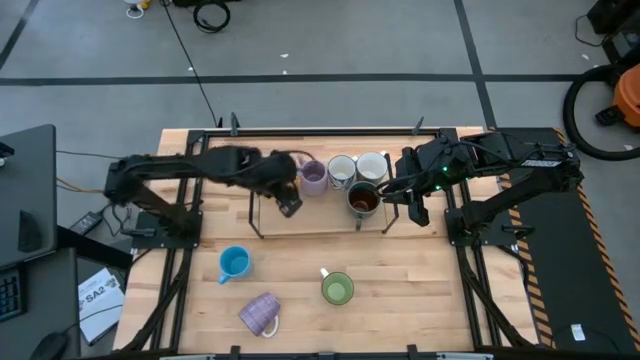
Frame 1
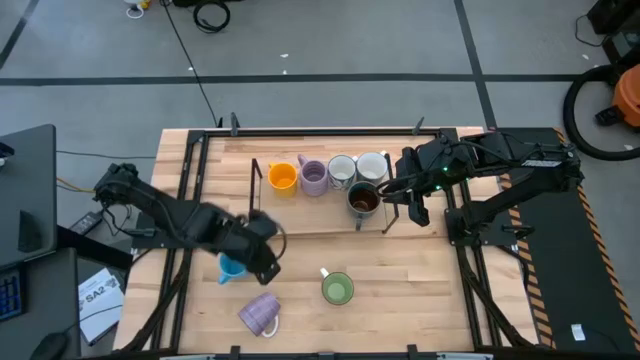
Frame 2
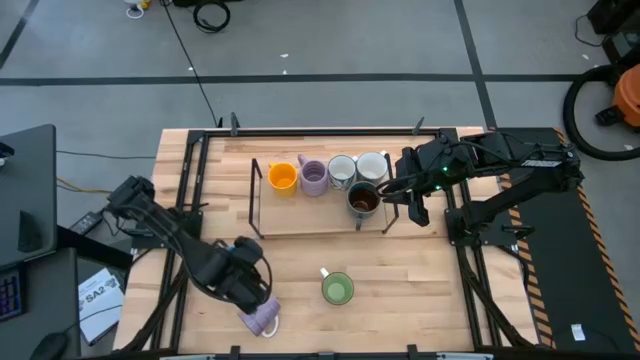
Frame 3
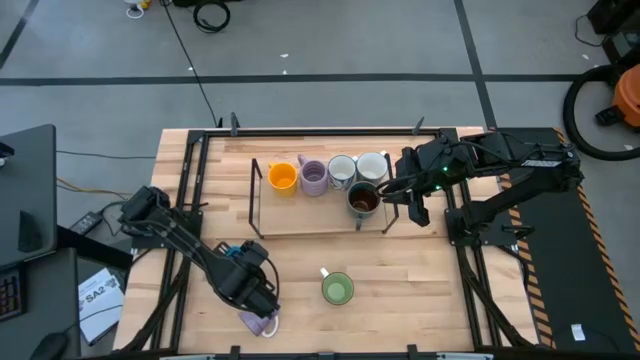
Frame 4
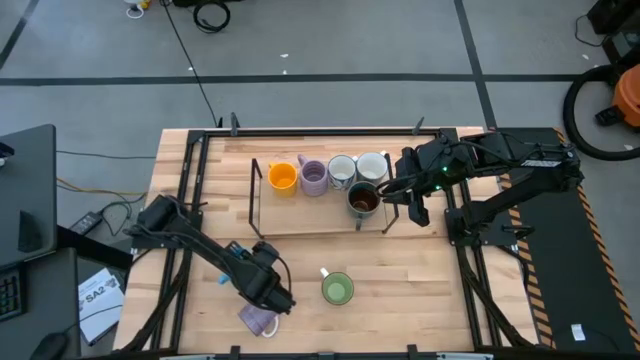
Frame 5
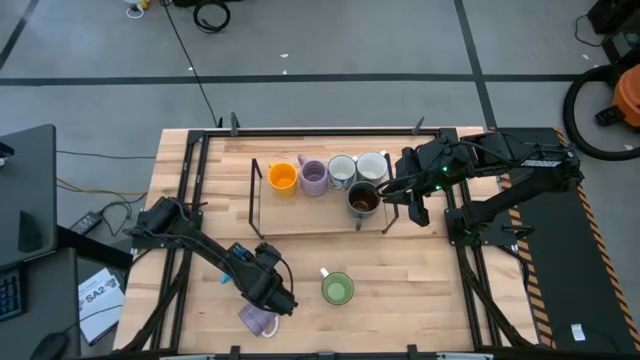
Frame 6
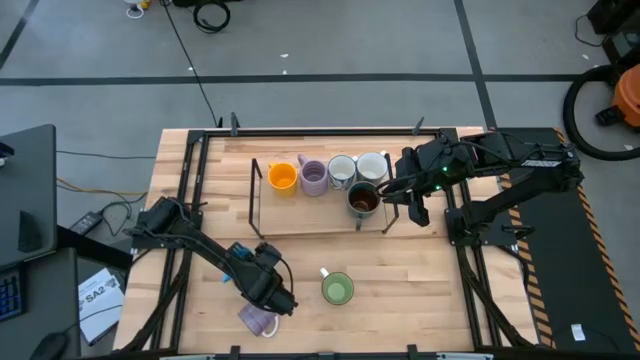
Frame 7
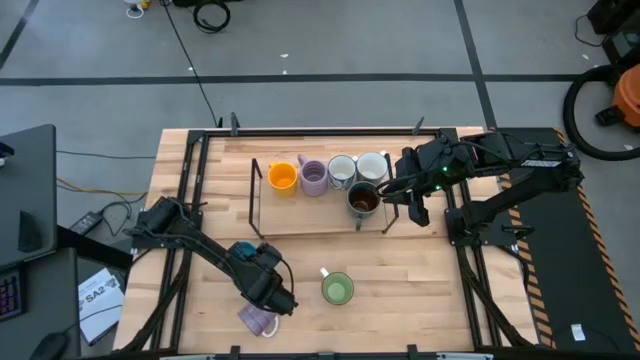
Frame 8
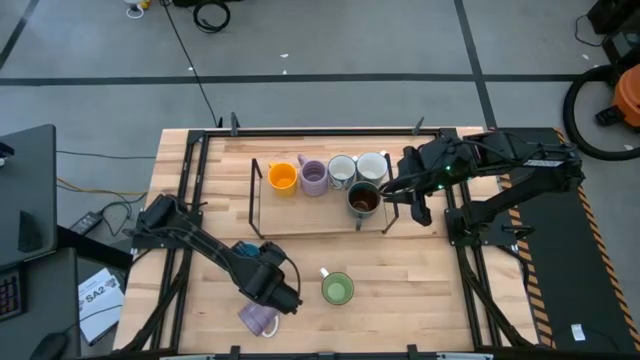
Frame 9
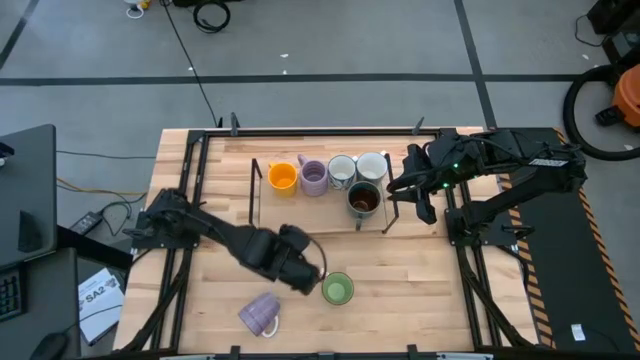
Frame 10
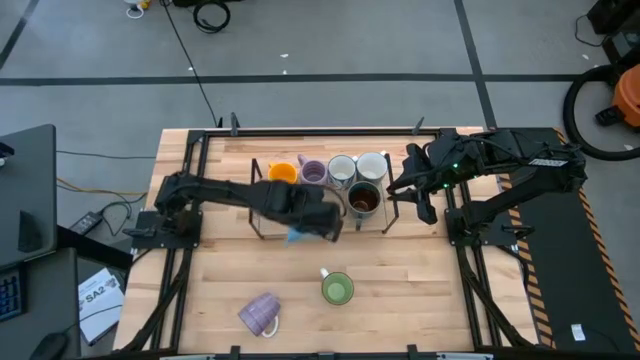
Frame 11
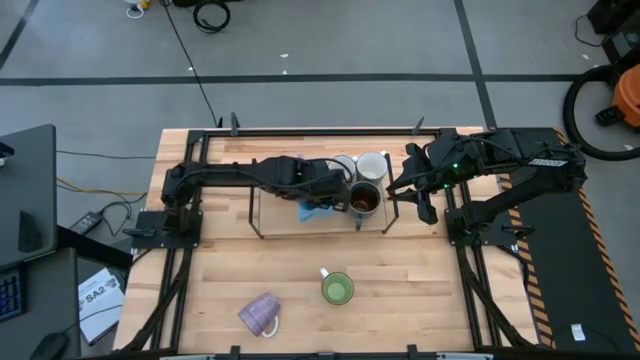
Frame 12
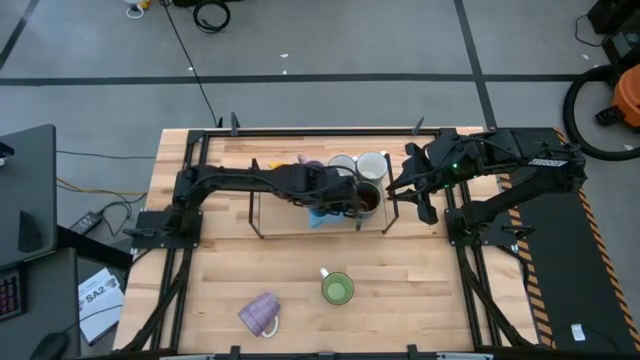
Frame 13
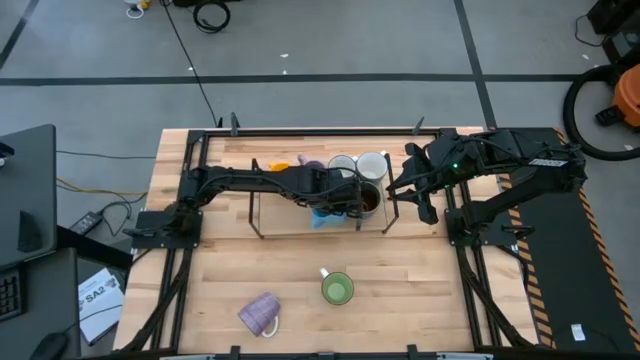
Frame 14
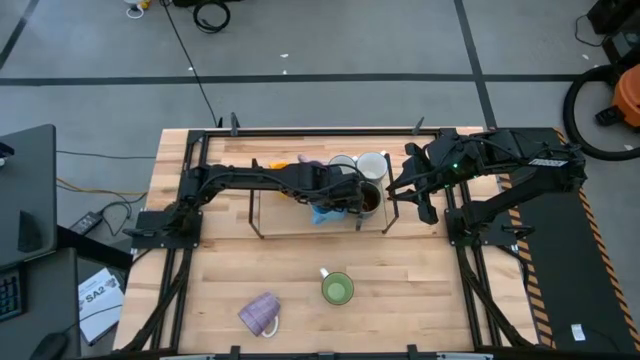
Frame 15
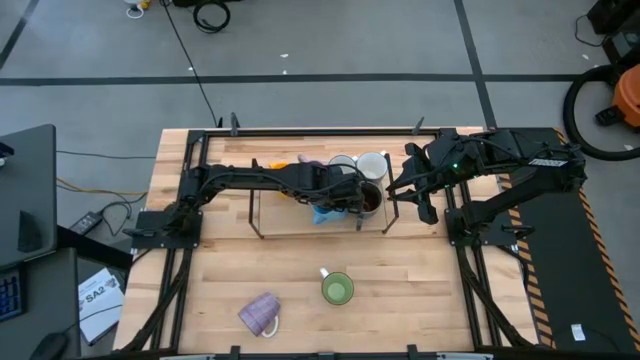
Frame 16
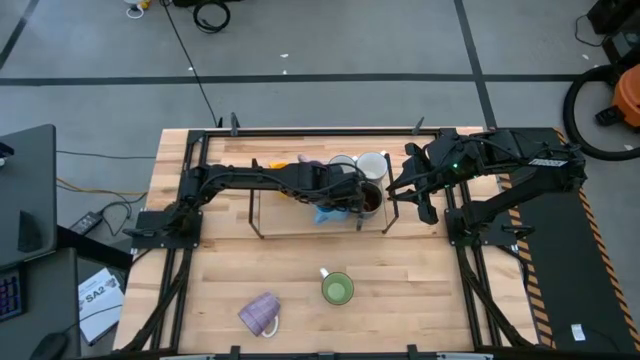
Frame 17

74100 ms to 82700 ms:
Task: Place coffee mugs
Put the blue mug on the shelf

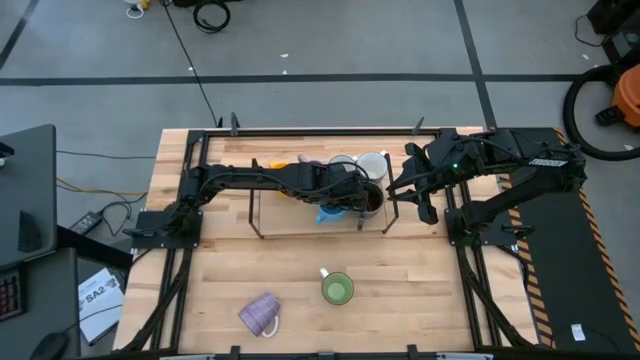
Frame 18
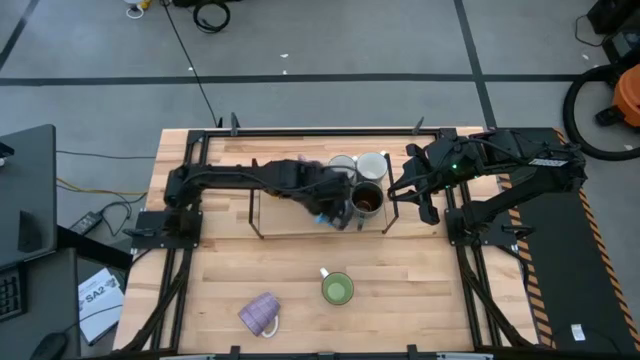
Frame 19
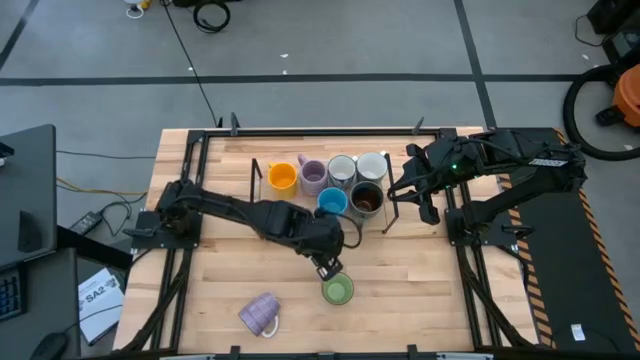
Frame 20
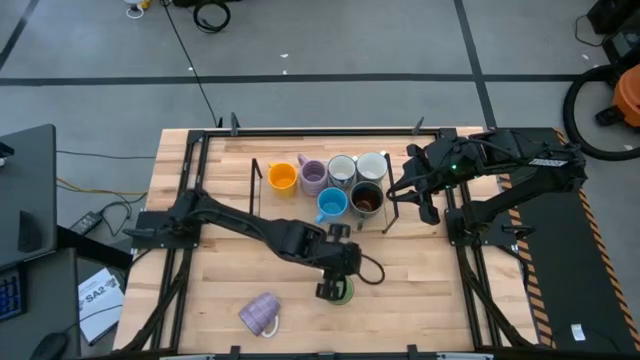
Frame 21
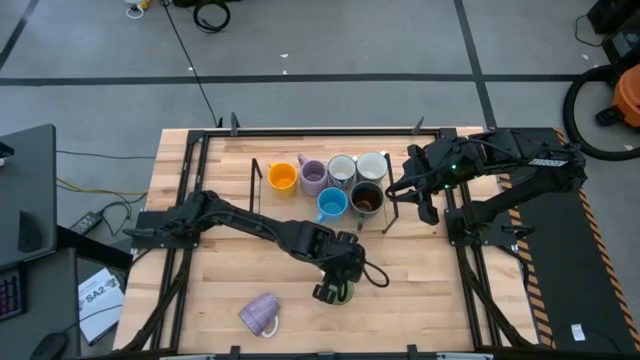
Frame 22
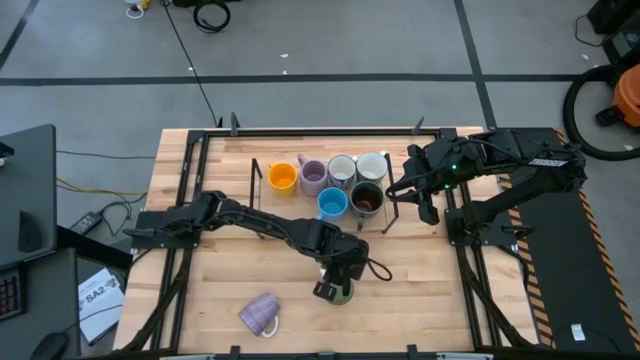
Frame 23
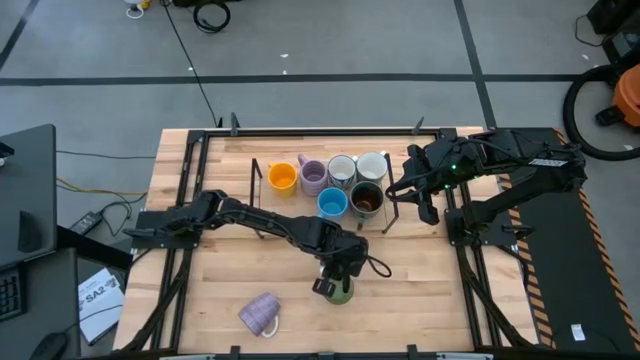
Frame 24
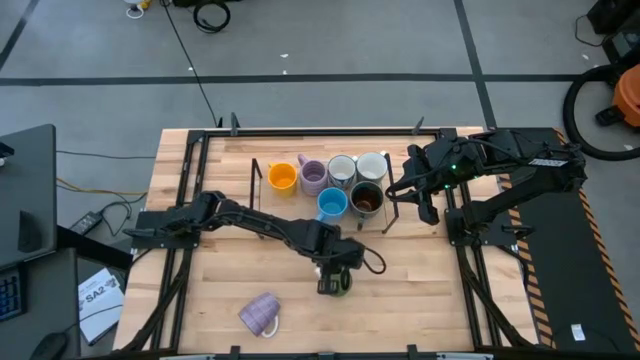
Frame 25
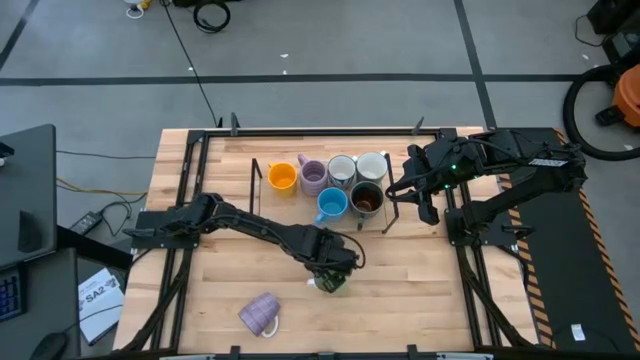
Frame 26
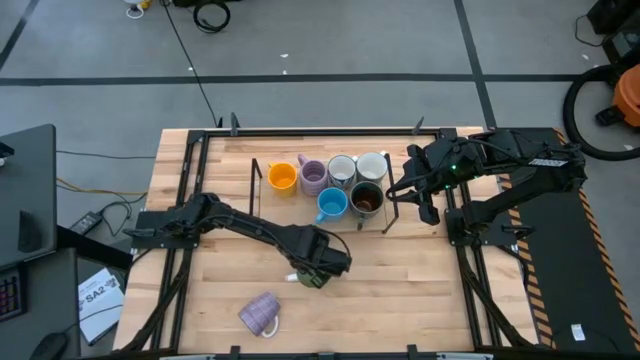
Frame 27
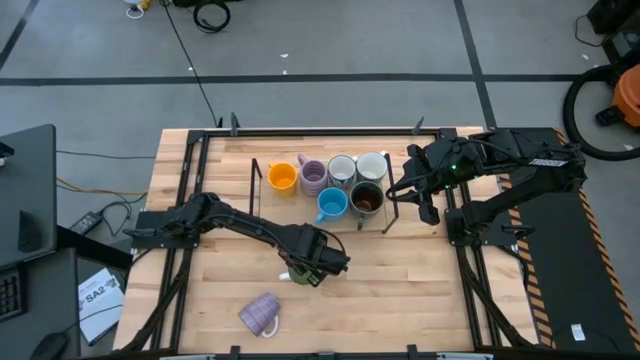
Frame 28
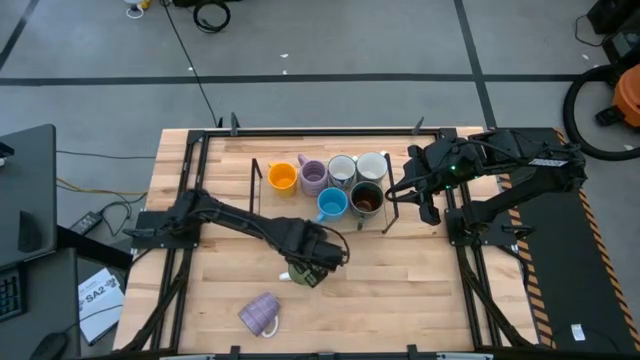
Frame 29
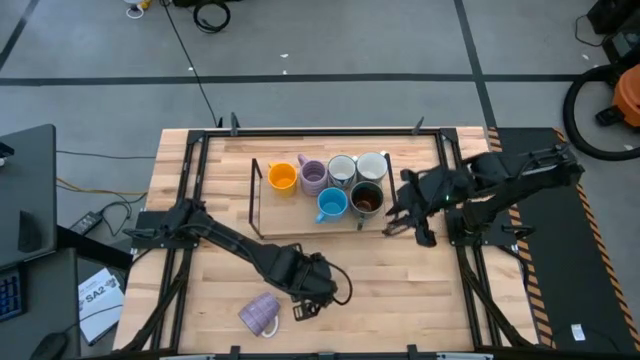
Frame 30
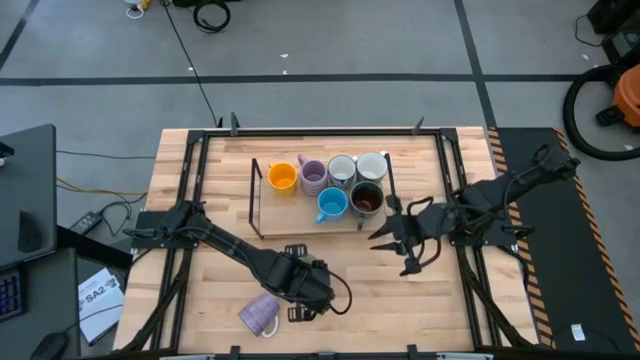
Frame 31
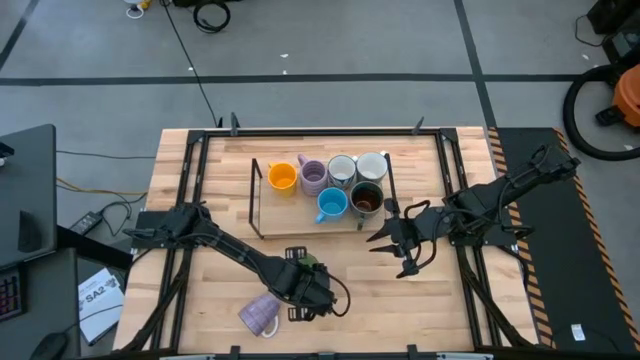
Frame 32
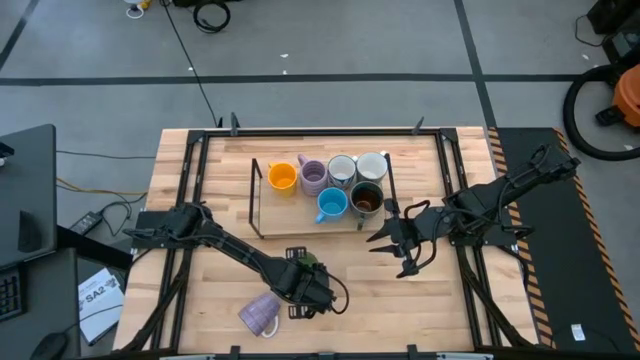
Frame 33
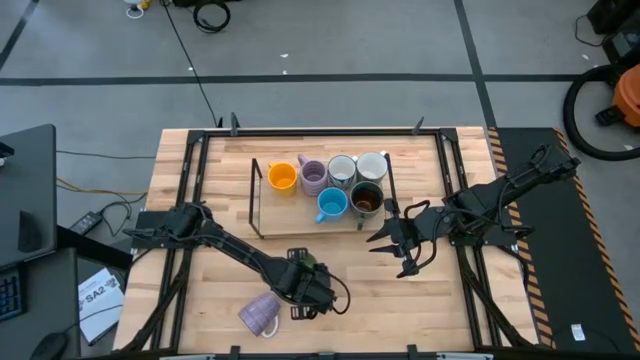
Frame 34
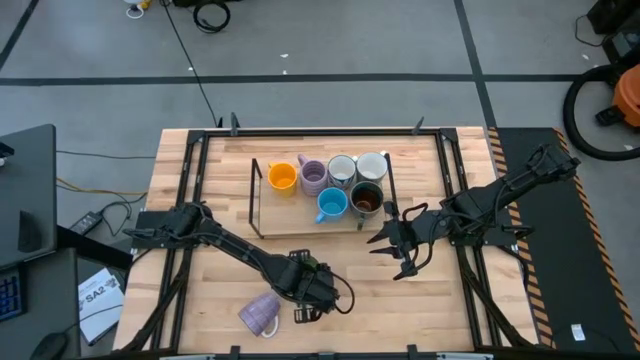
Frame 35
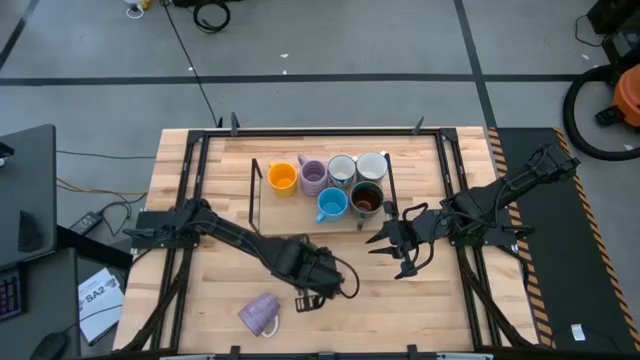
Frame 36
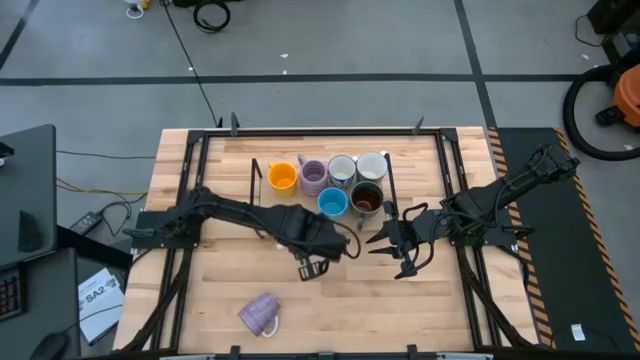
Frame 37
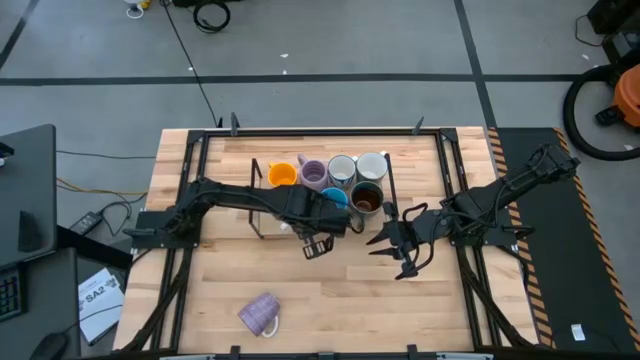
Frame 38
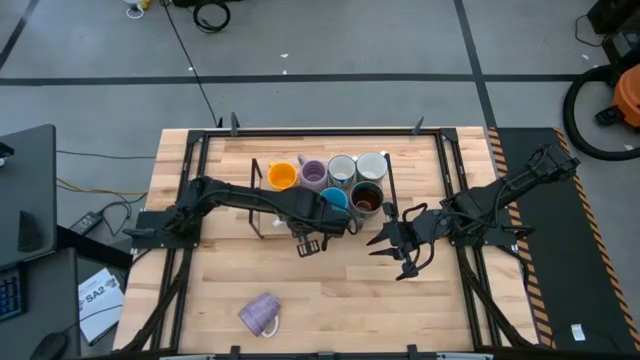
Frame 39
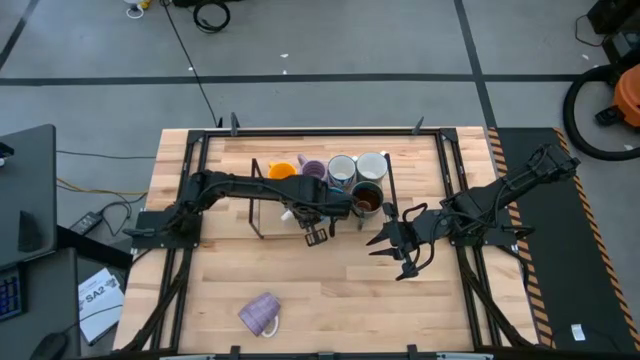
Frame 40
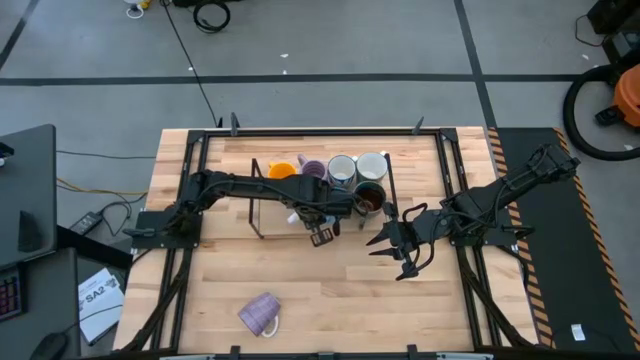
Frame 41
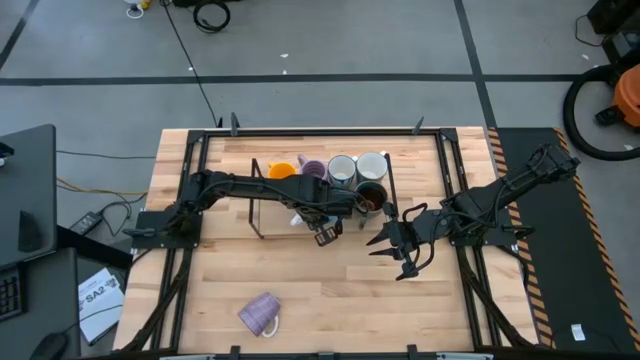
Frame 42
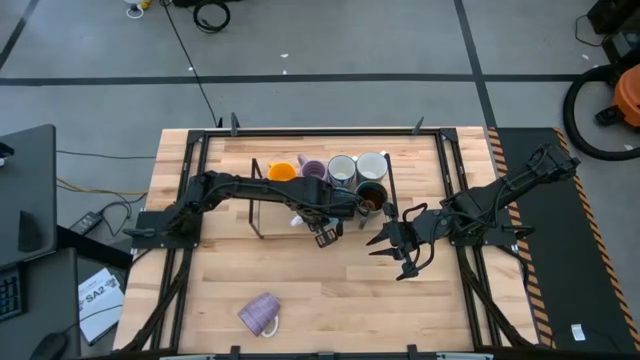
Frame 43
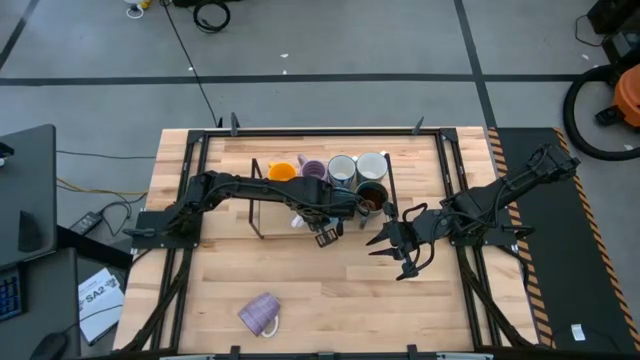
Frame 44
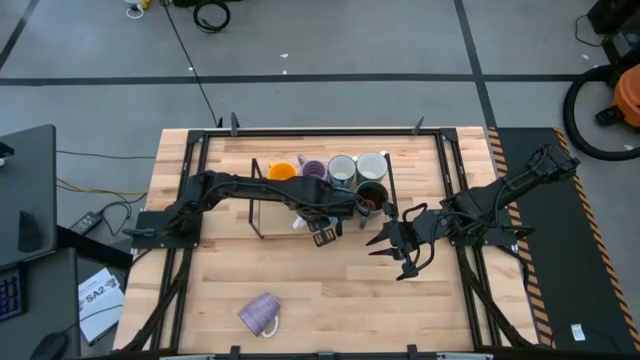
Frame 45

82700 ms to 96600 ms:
Put the green mug on the shelf
